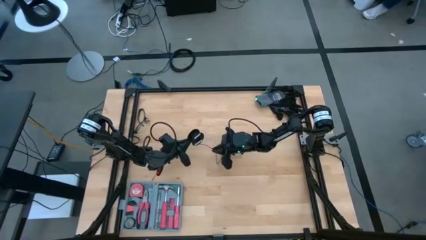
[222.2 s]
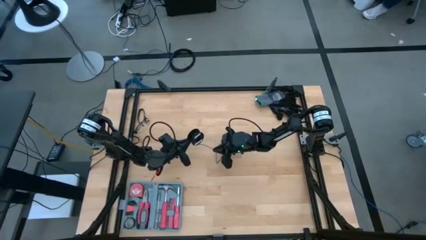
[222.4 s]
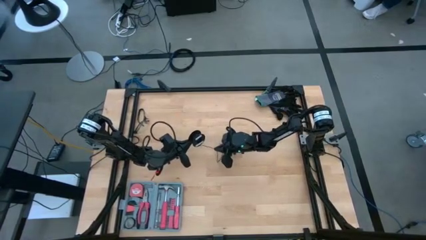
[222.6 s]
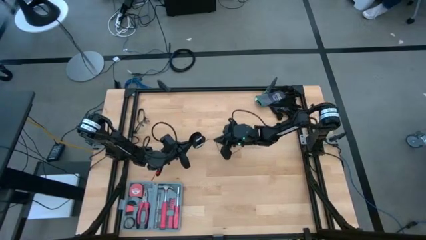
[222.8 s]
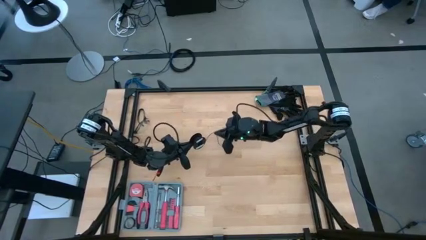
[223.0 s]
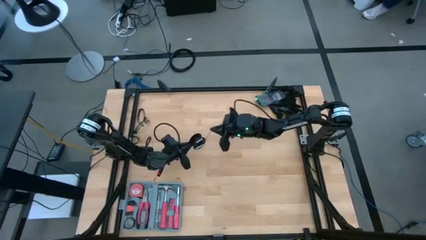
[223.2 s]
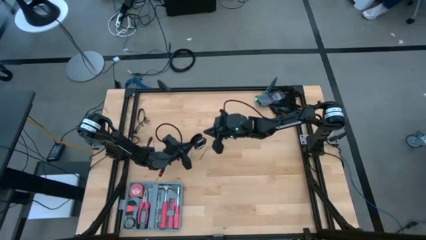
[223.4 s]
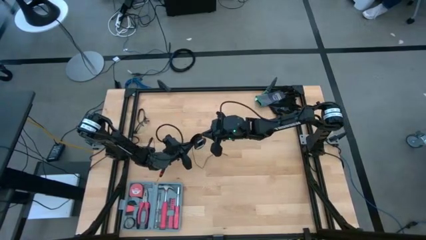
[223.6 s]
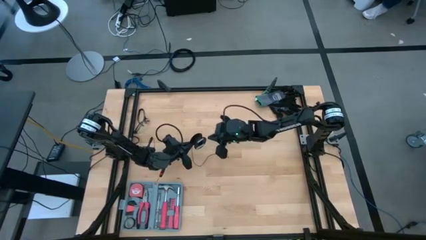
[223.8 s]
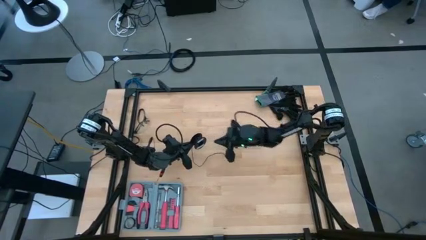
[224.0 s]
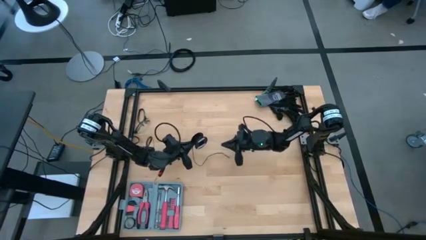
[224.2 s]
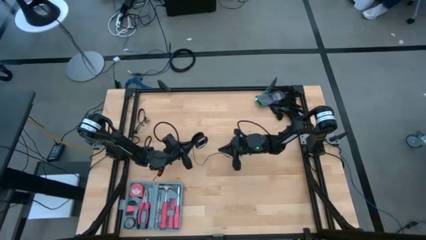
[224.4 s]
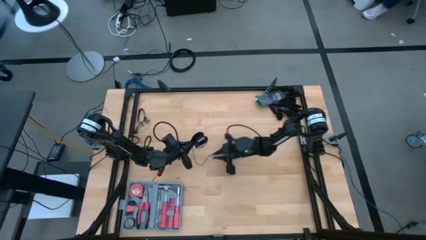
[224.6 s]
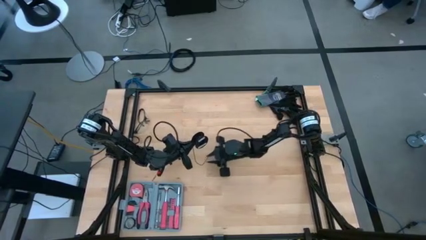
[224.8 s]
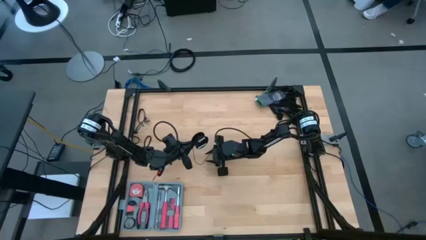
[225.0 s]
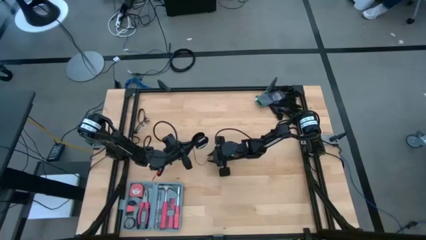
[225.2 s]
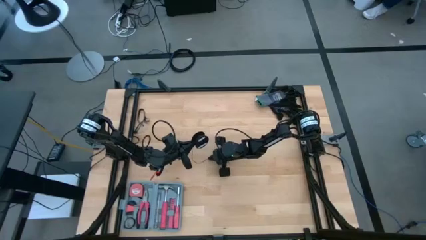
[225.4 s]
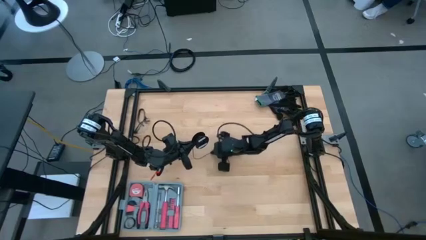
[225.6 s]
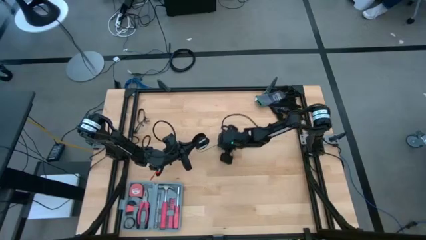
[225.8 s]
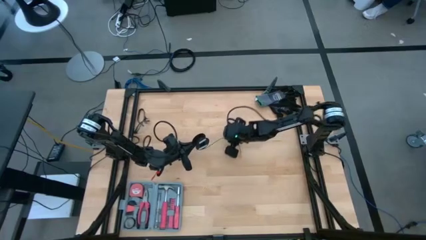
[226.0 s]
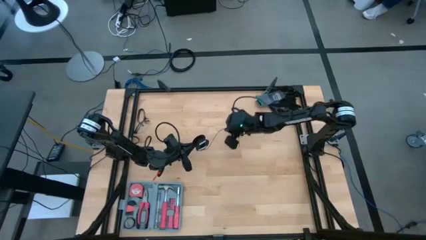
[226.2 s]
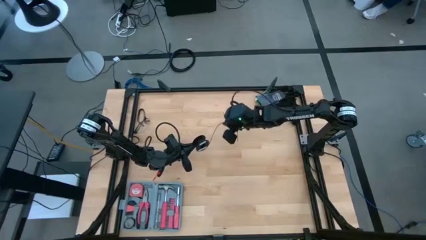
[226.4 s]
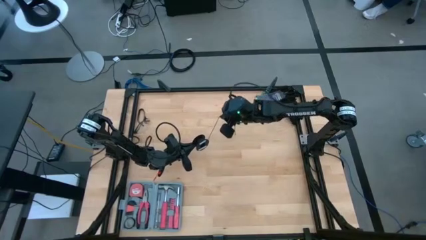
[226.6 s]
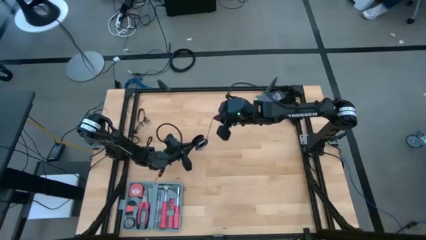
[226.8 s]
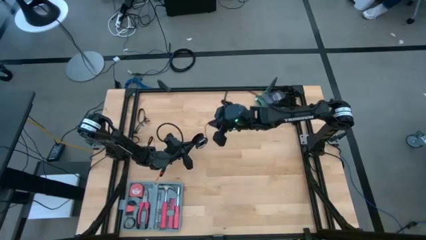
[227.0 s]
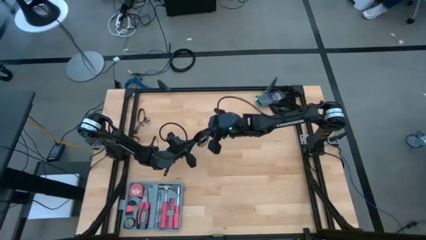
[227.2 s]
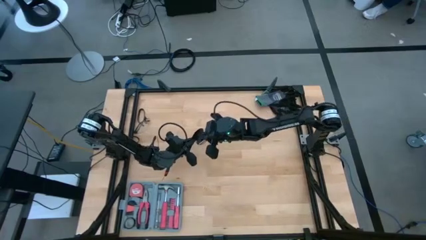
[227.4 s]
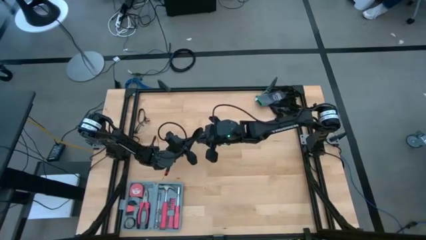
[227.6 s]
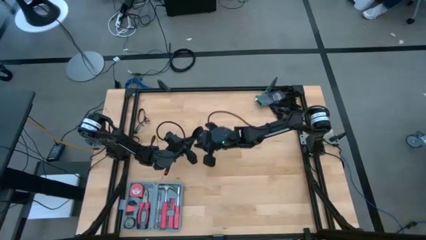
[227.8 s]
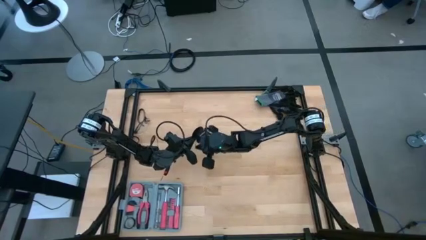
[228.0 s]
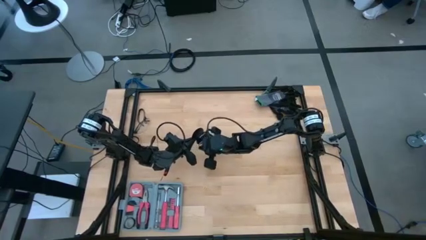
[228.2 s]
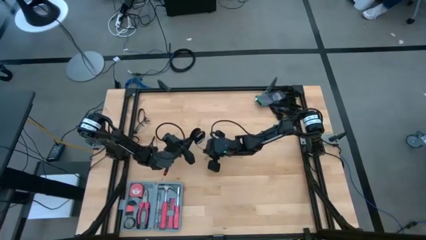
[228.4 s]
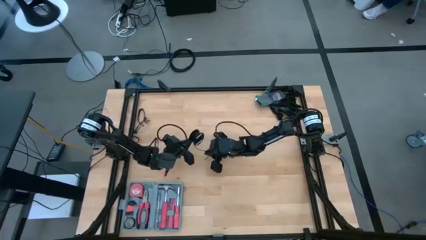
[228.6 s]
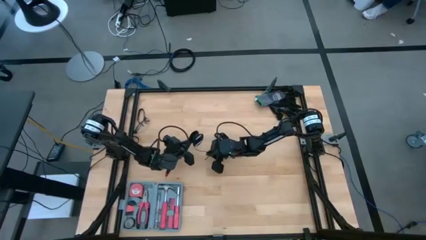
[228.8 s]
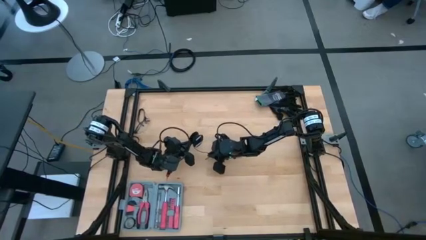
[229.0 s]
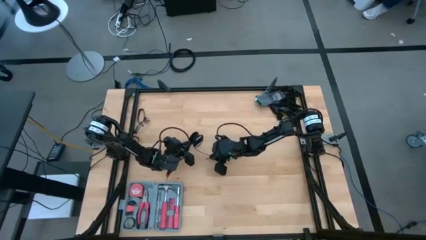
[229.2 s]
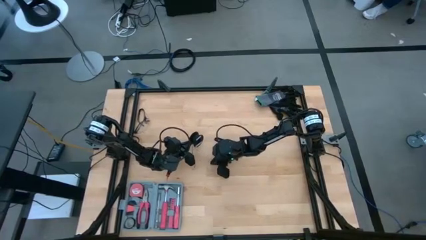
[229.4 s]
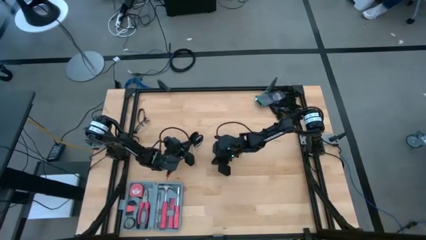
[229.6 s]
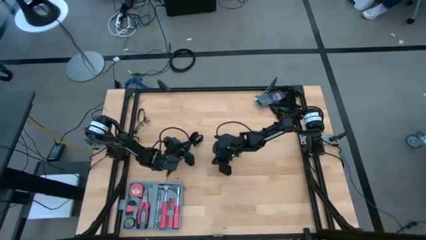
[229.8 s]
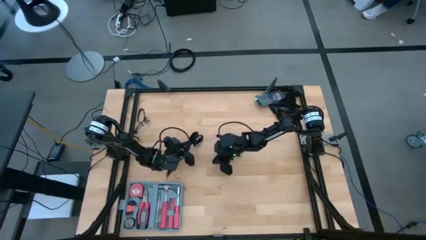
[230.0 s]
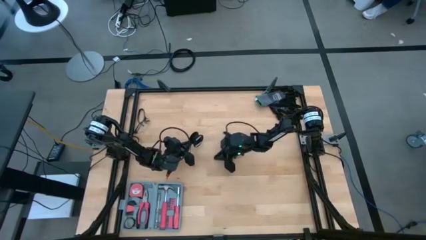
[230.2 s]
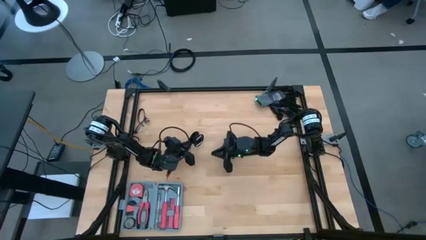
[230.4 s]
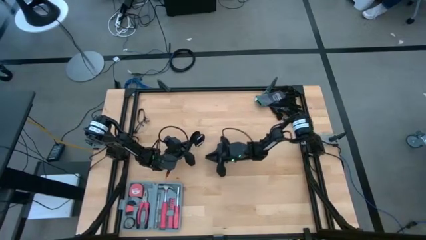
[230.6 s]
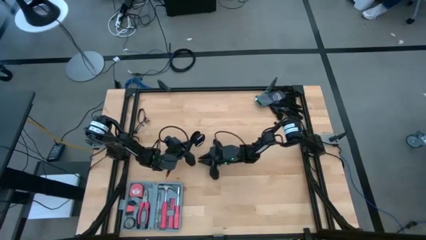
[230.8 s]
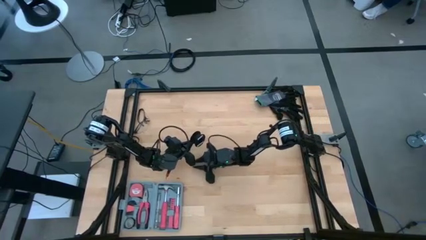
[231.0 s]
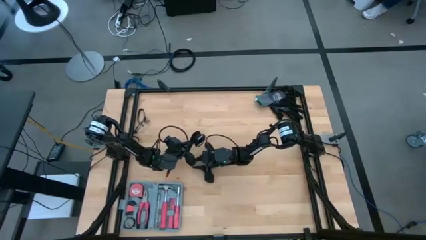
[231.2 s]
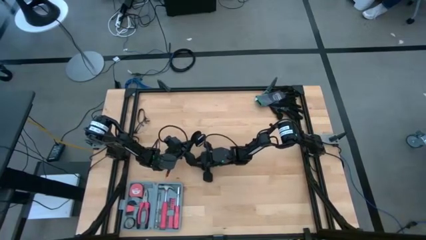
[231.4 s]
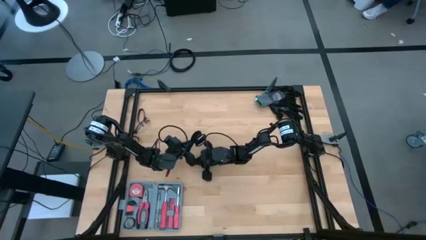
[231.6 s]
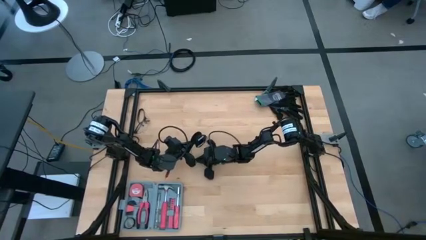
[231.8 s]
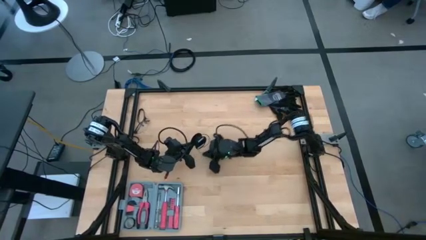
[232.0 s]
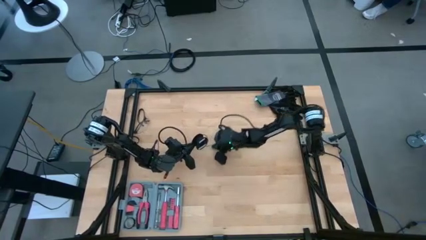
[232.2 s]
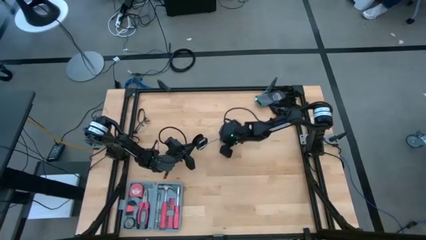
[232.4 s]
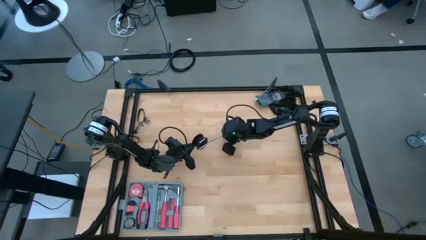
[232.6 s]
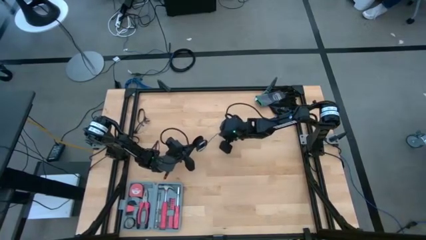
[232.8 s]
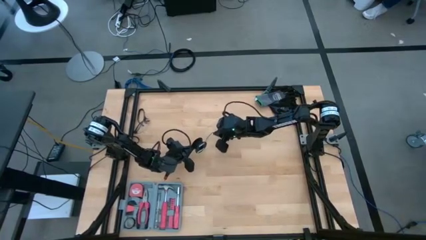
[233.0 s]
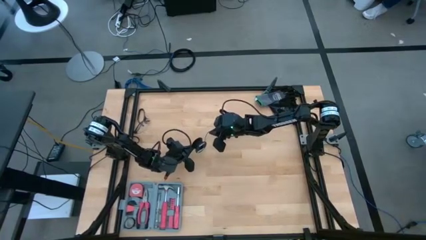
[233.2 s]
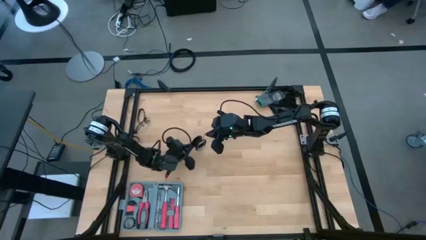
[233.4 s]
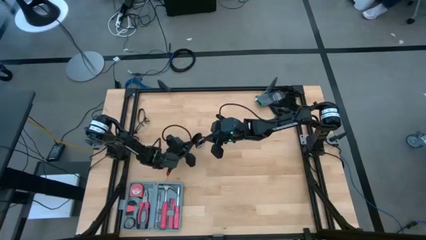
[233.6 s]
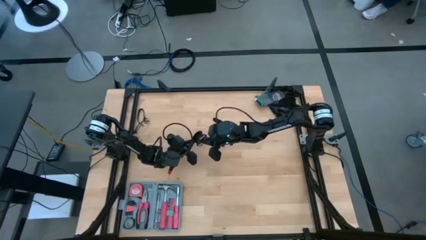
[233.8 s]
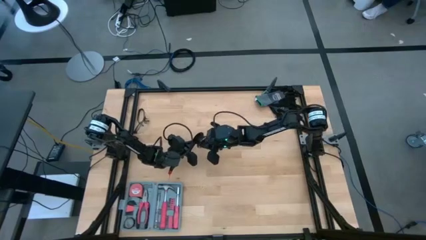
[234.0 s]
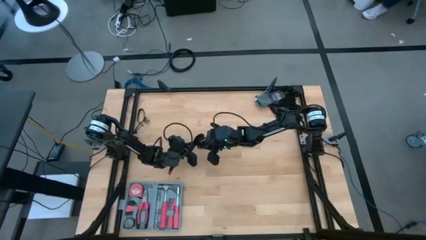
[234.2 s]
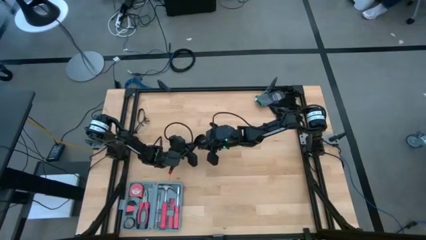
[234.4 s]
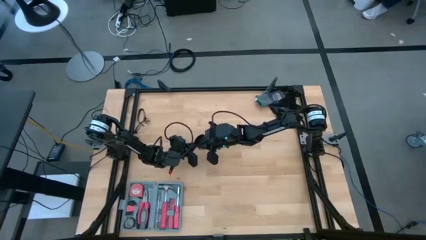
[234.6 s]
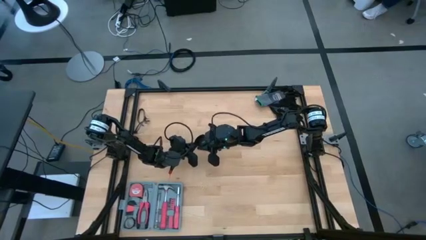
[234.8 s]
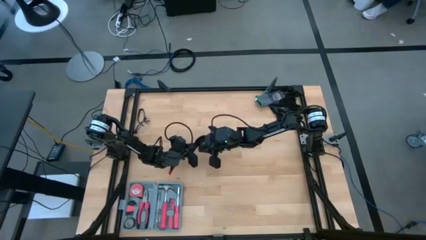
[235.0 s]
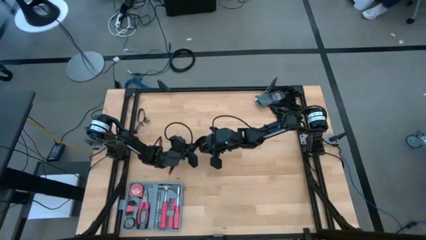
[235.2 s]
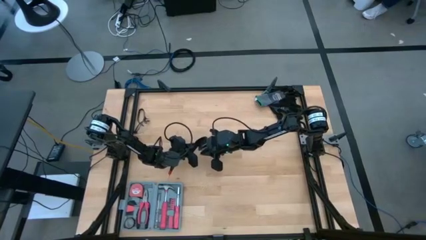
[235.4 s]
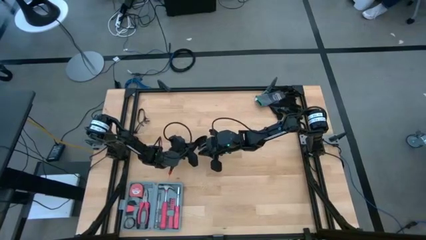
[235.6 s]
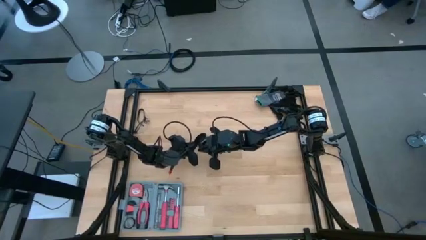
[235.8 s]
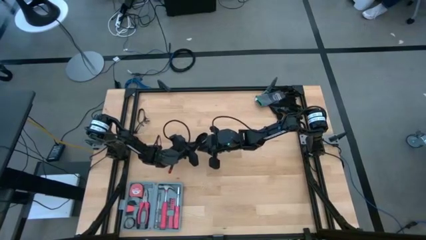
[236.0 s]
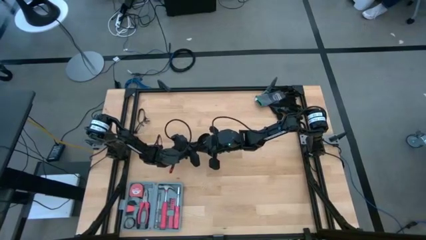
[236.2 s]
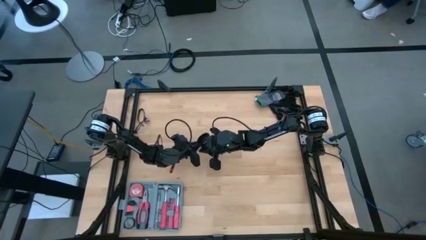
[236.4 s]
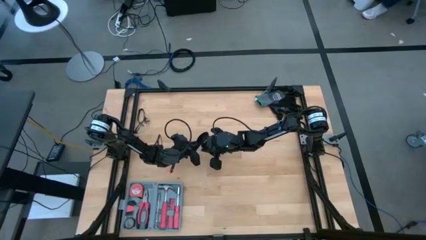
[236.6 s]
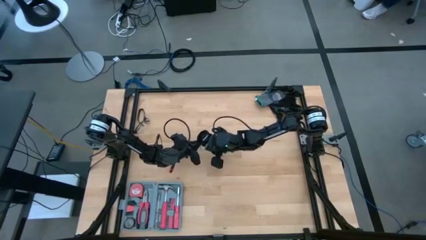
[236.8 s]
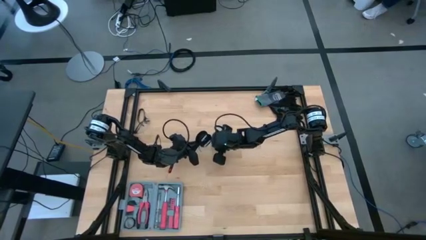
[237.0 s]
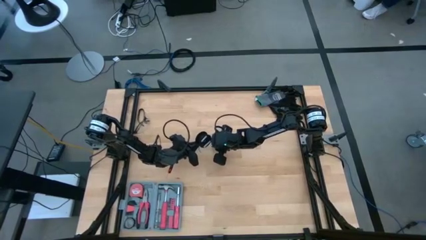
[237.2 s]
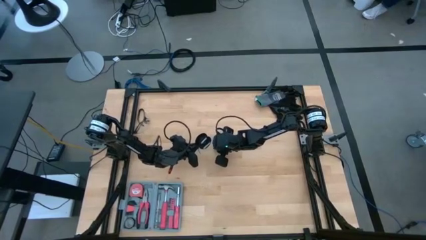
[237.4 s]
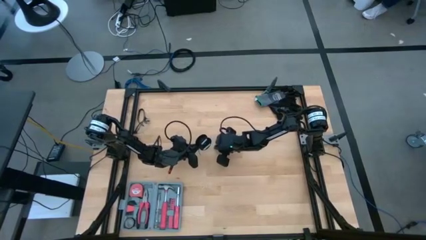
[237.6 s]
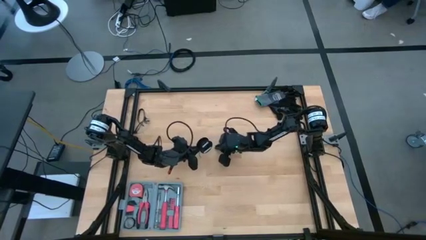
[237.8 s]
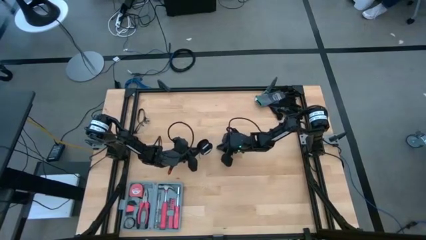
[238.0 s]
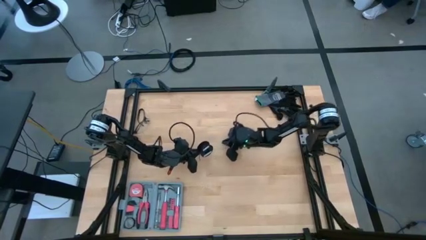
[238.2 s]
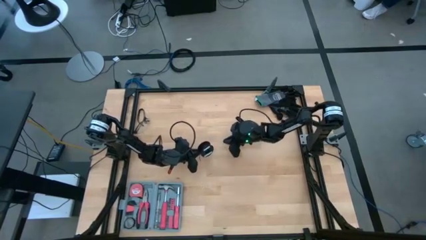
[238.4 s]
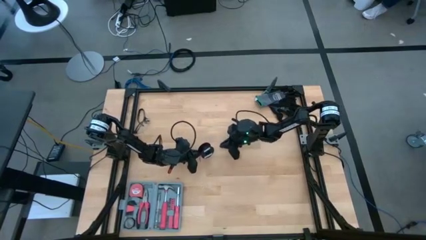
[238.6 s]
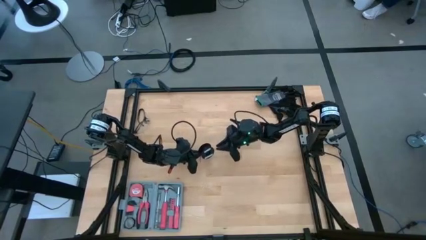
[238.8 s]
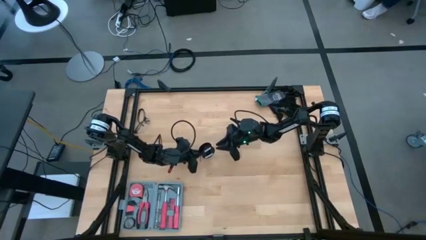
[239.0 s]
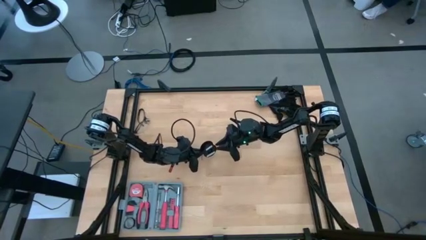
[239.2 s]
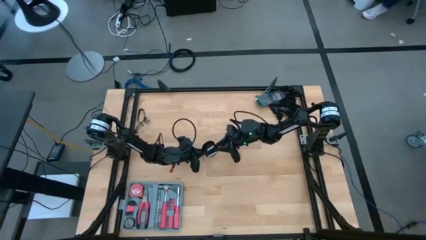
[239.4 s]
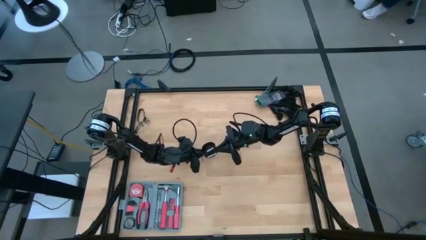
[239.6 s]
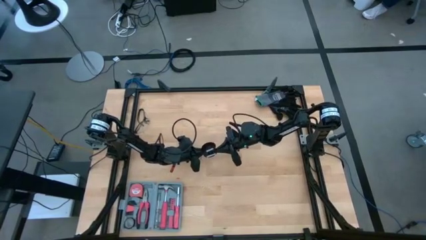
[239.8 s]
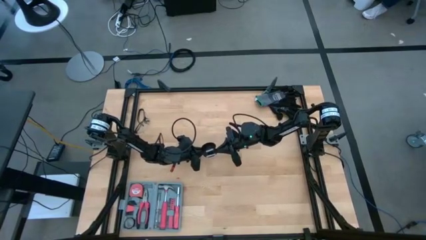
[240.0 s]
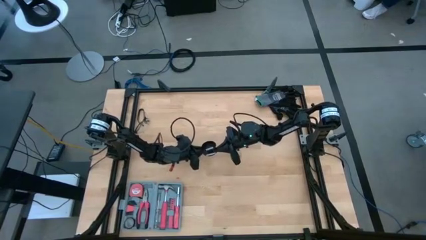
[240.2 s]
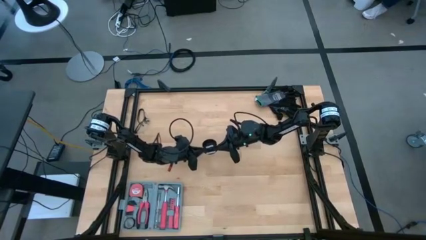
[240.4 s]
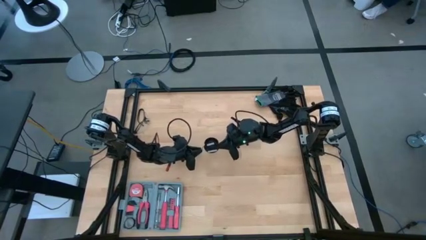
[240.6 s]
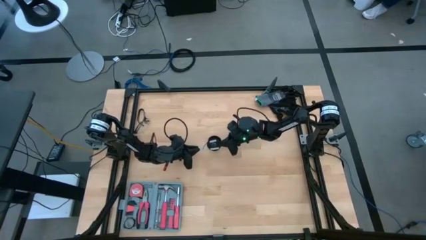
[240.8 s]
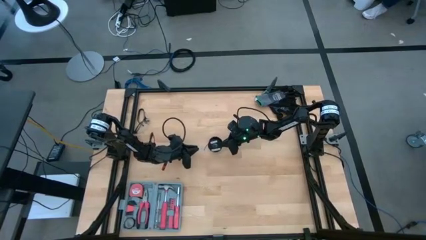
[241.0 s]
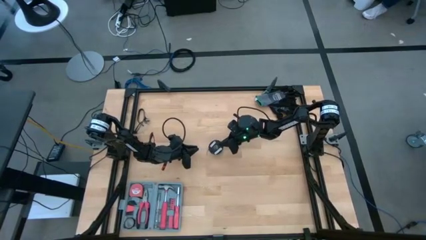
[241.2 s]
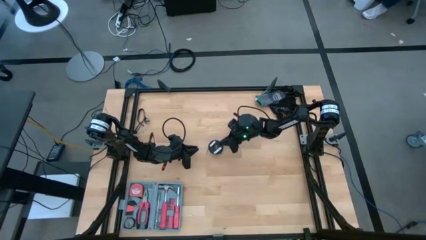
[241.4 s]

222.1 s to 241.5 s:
Task: Coil cords
Coil the black wire onto the spool
